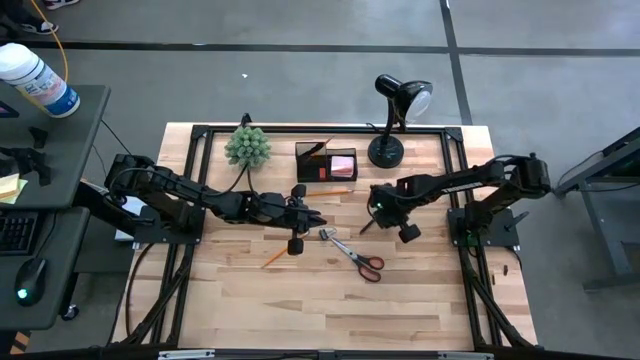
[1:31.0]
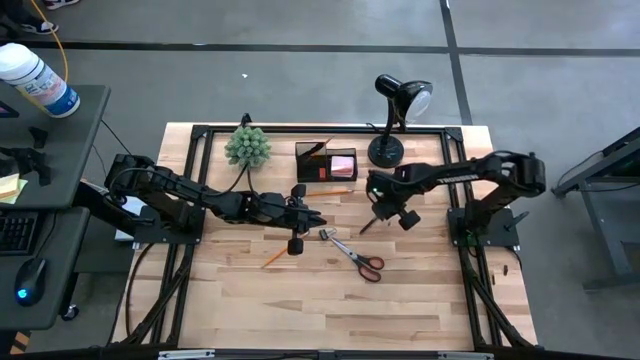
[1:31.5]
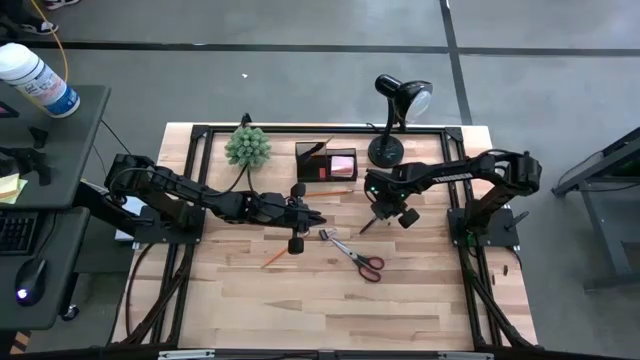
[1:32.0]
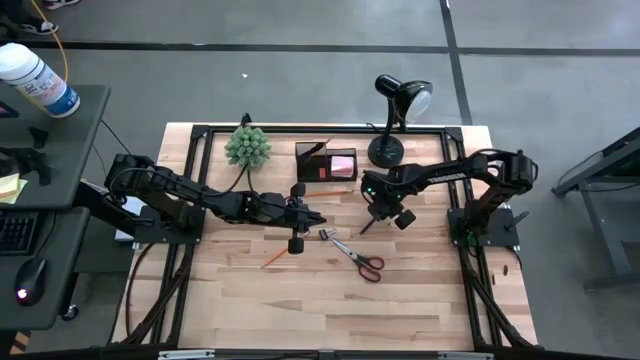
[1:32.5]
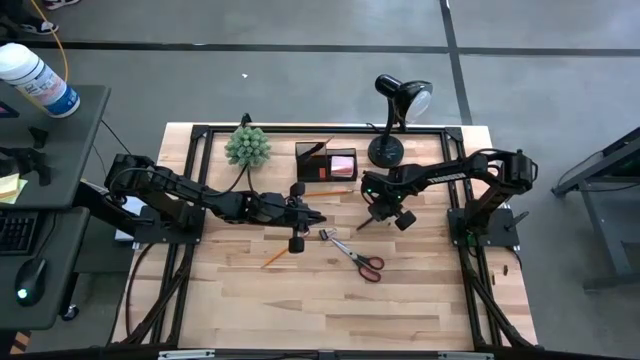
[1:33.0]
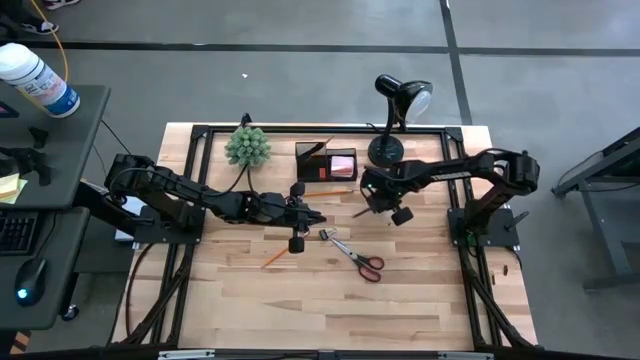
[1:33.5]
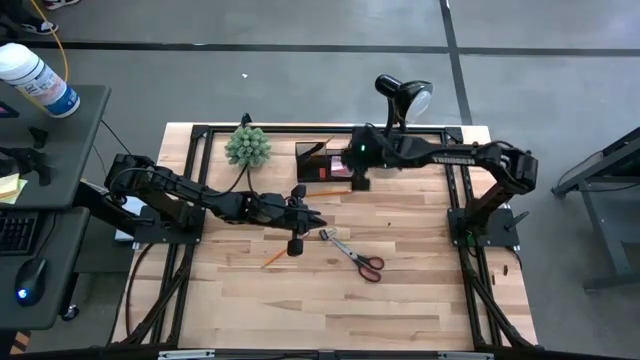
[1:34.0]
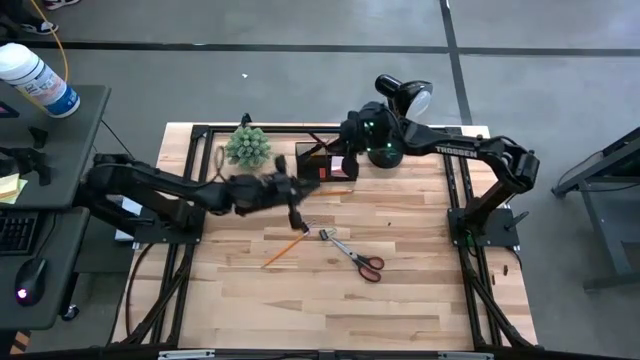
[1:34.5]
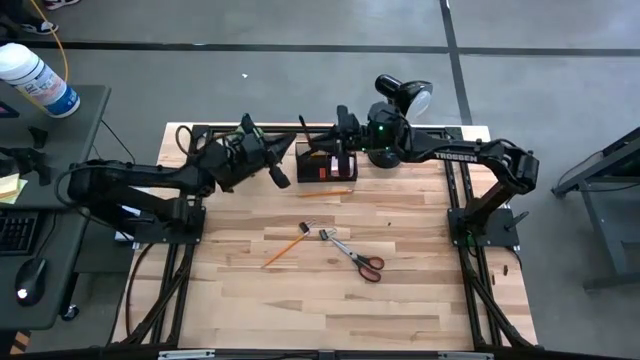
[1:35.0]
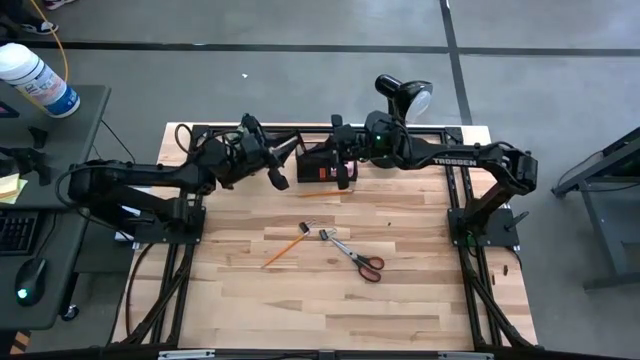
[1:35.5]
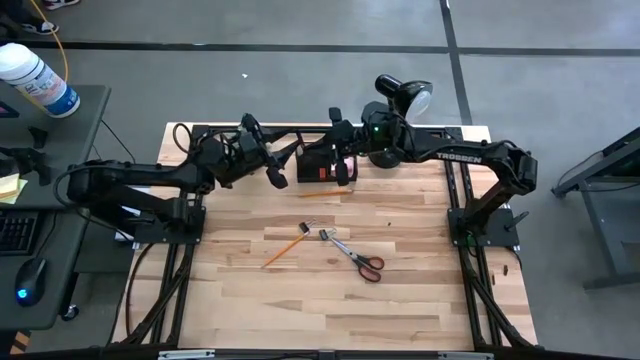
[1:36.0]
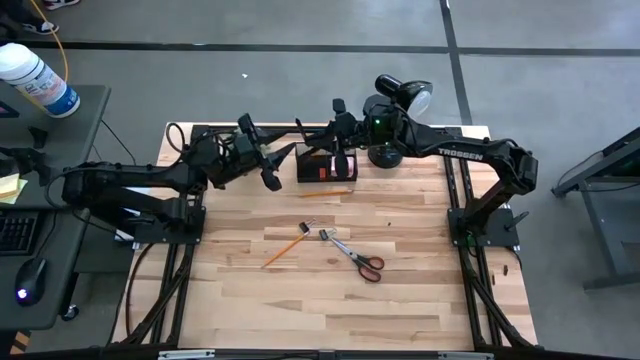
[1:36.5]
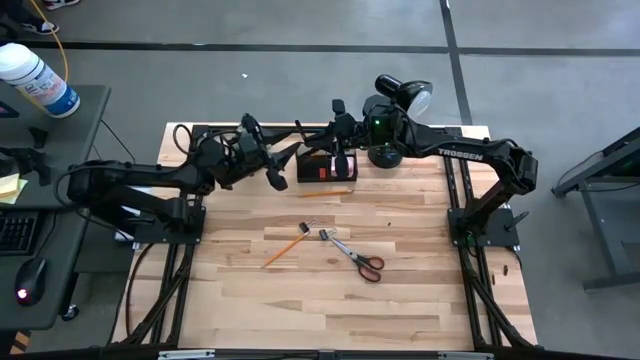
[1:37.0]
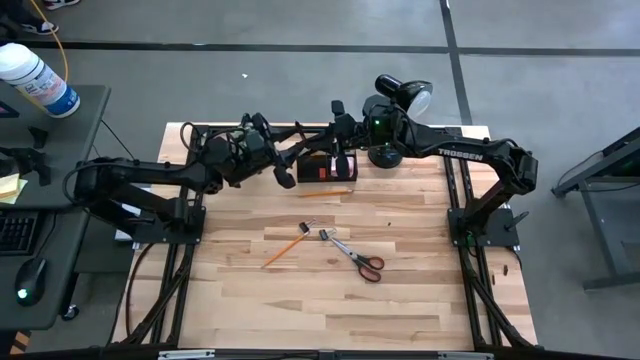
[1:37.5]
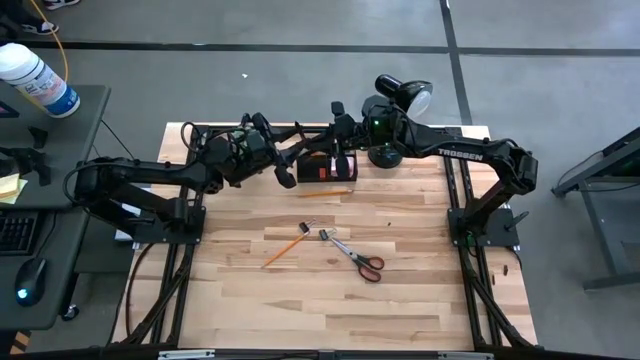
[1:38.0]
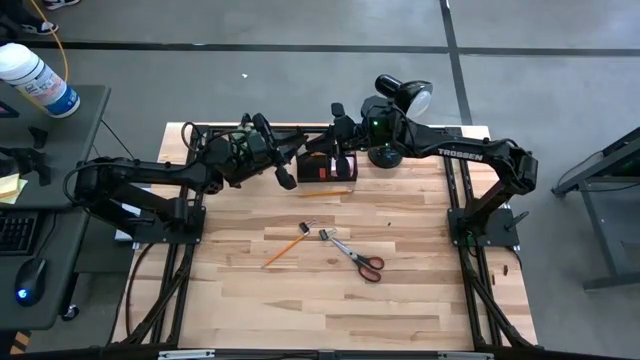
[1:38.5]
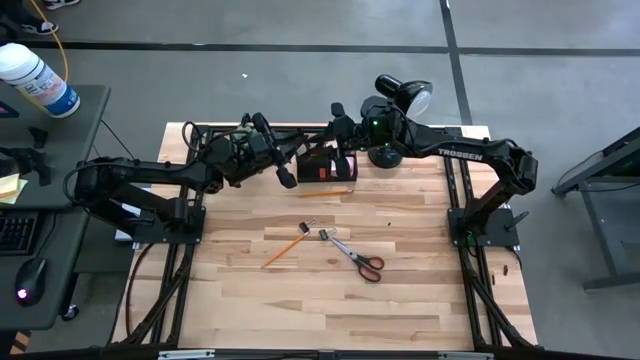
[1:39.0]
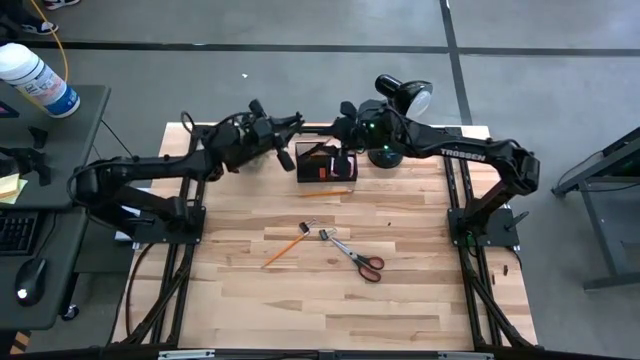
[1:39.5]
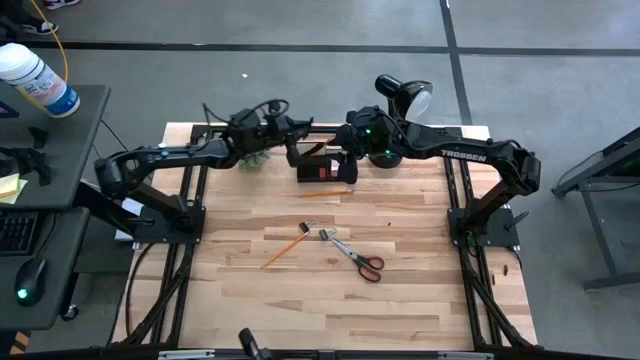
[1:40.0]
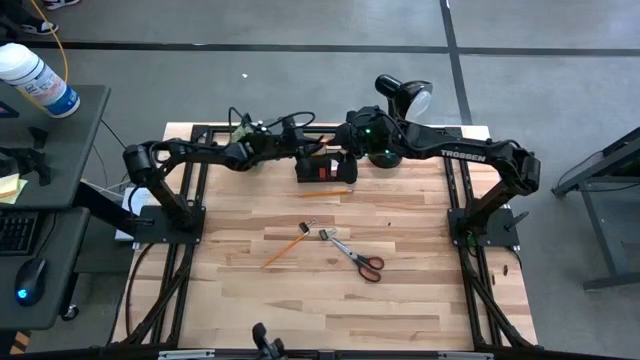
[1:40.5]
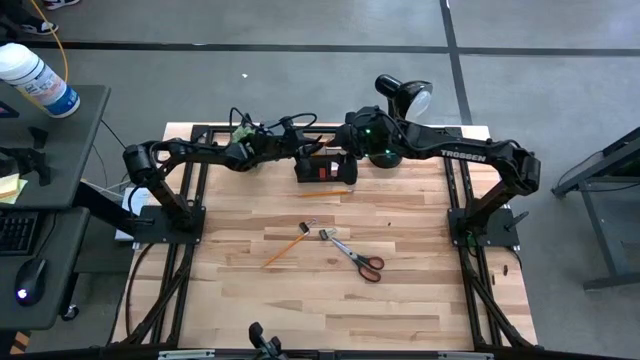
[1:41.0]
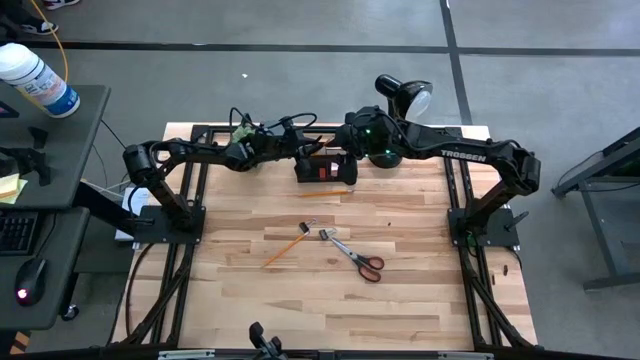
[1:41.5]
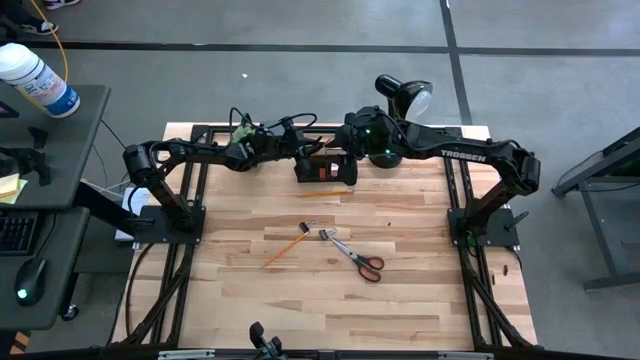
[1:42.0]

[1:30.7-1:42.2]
Task: Pick and place office supplies into organizer
Put the black pen into the black desk organizer

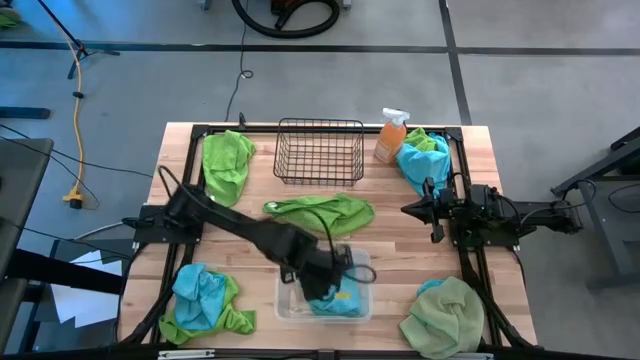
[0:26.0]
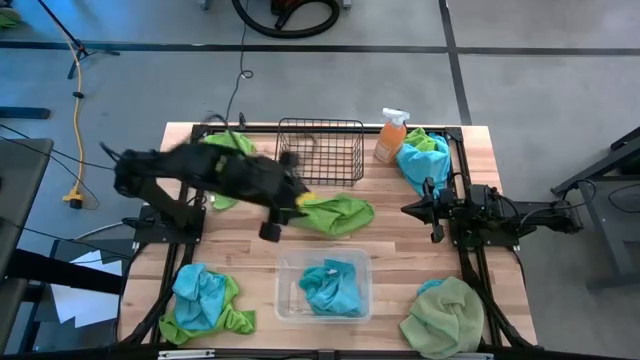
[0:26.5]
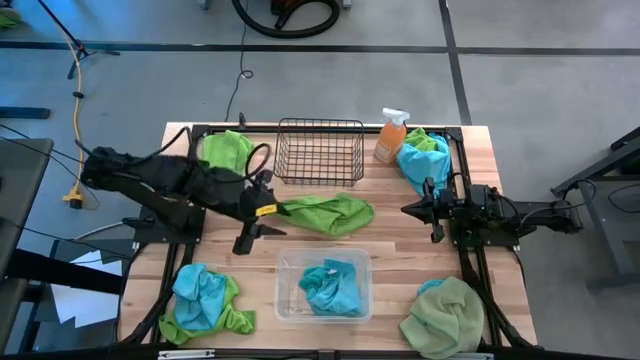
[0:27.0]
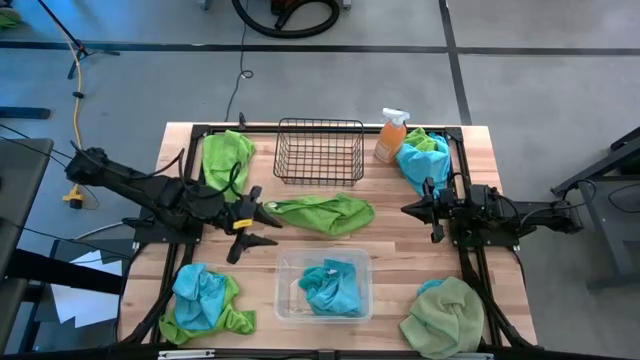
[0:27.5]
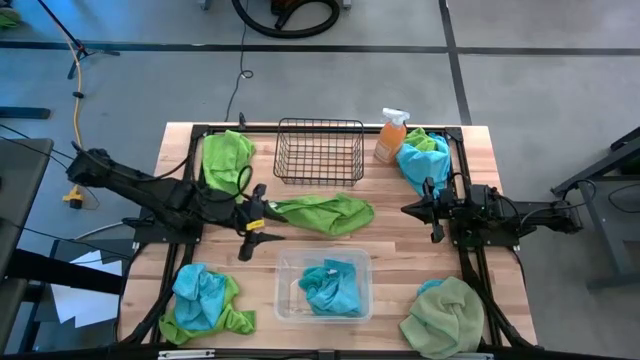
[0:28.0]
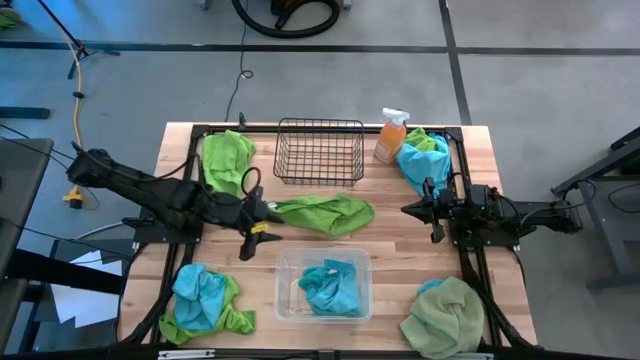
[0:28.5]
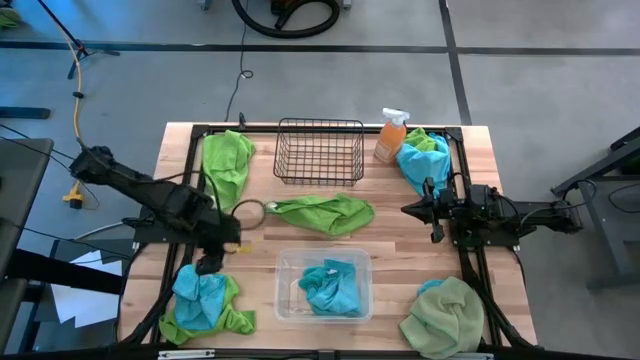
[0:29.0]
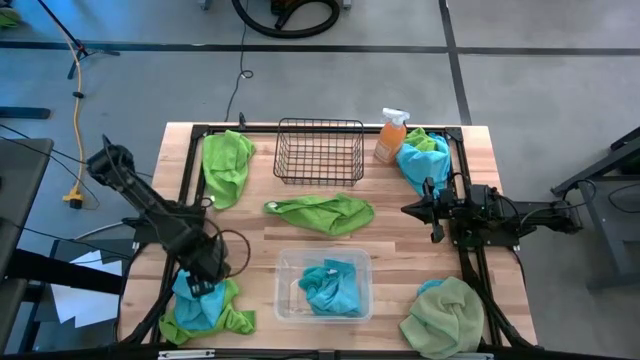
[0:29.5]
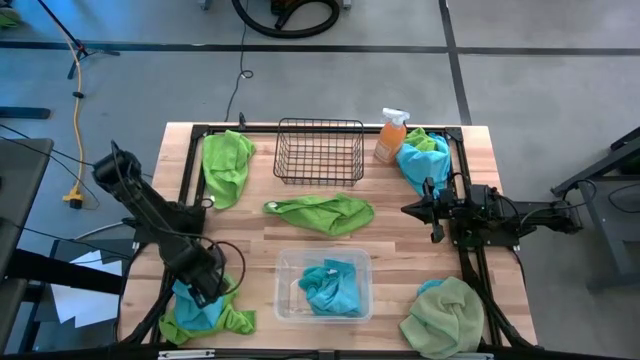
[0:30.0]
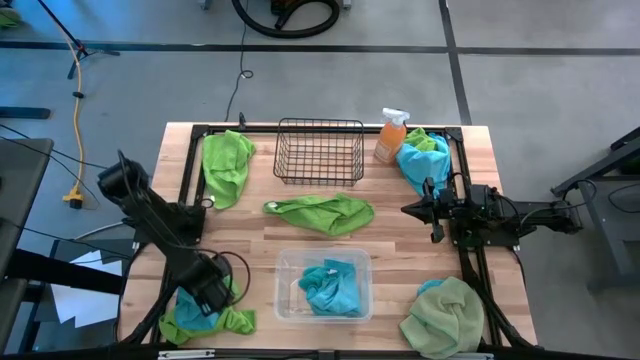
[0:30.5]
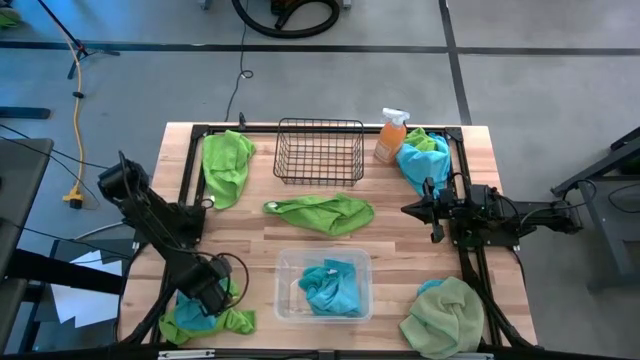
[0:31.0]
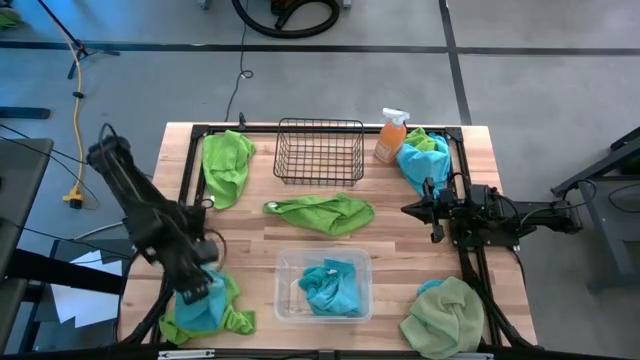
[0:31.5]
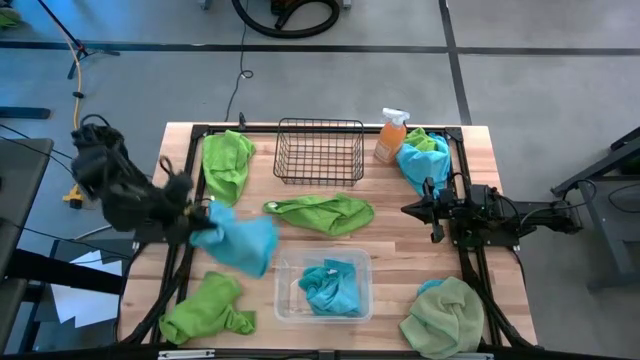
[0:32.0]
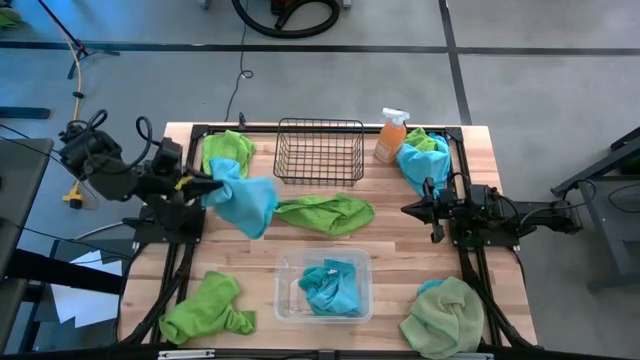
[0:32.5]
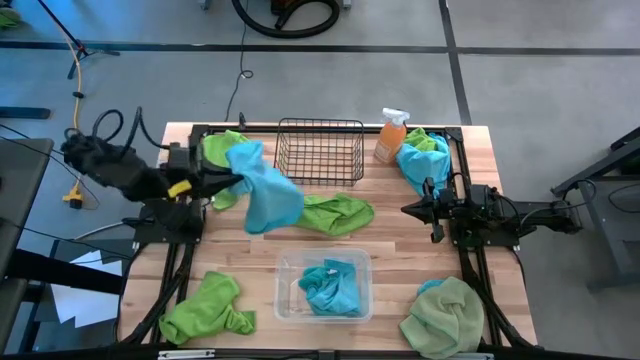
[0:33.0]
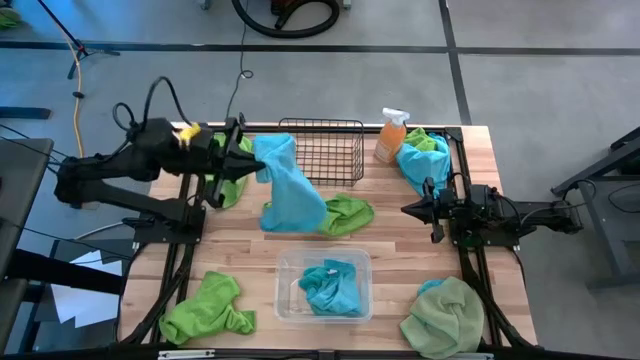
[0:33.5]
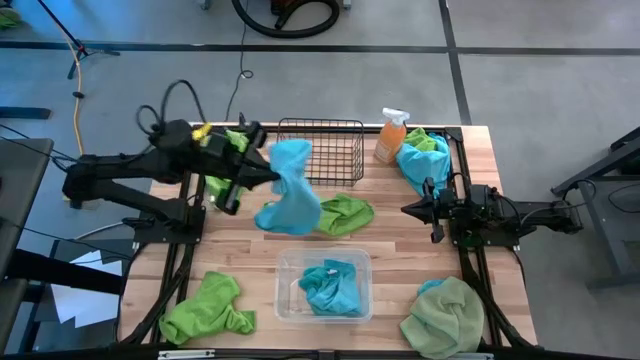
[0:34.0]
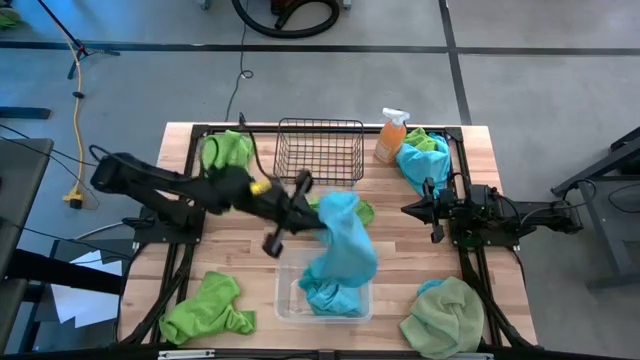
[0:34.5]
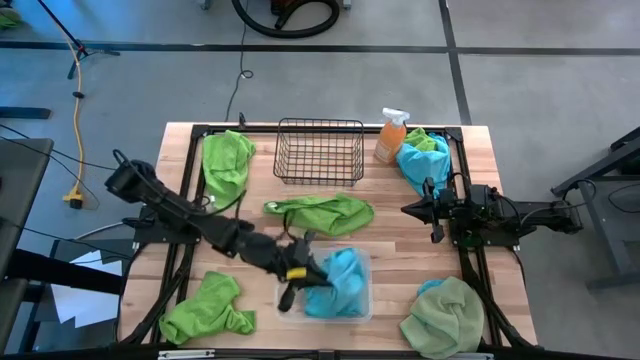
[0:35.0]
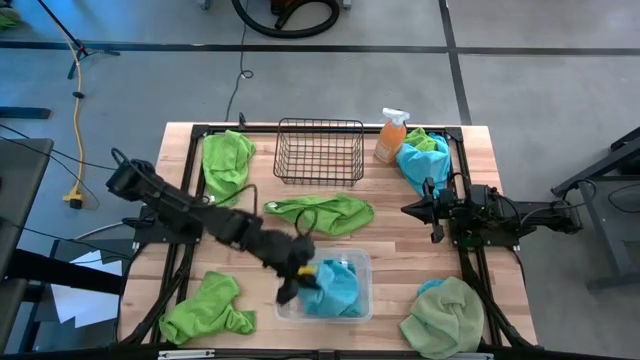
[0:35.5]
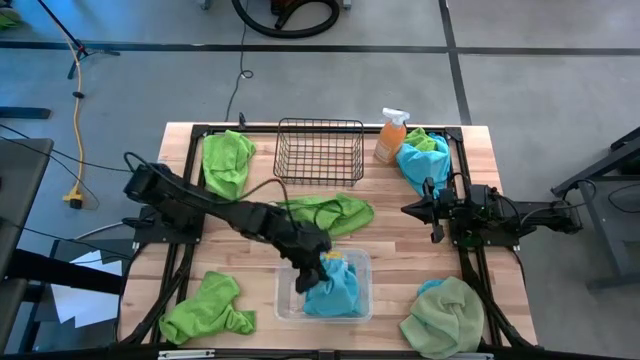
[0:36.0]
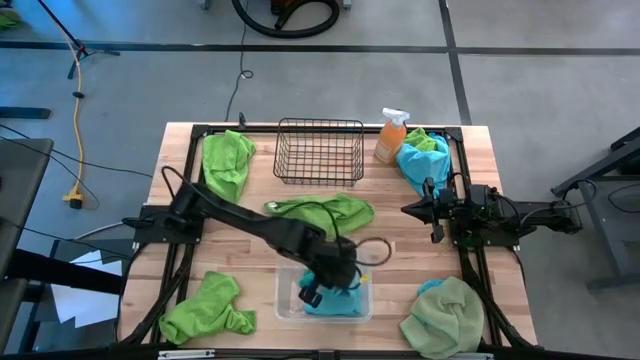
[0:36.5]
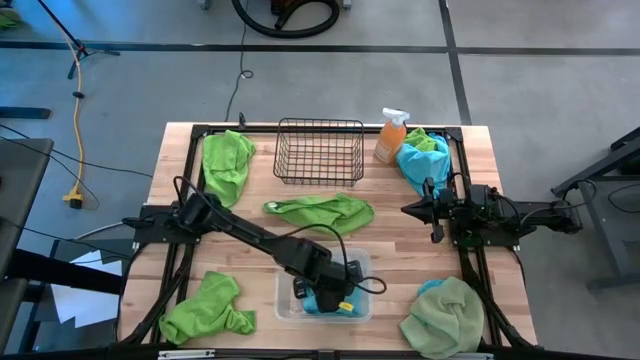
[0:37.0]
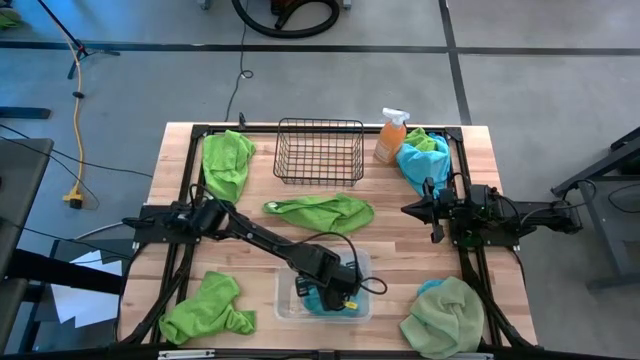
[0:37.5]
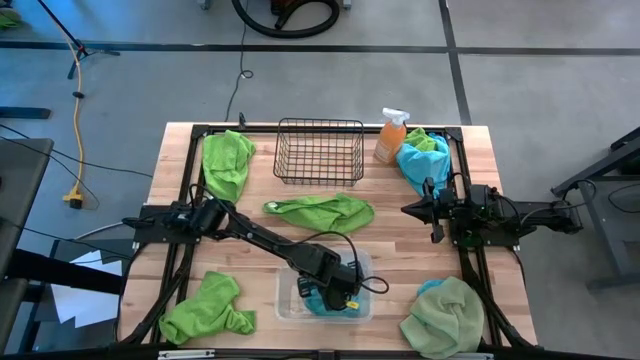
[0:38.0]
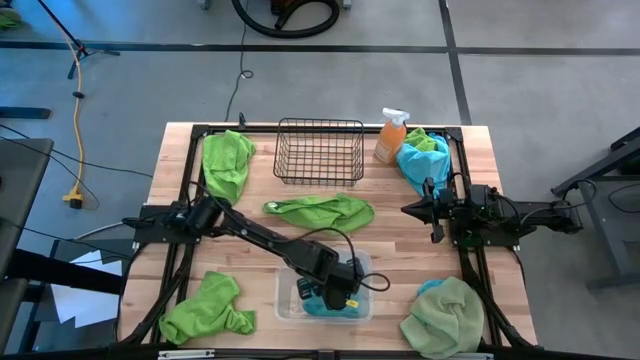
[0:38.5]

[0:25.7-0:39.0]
Task: Sort microfiber towel by color & place in baskets
Put the bottom left blue towel into the transparent bin
